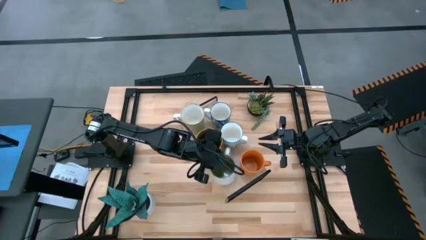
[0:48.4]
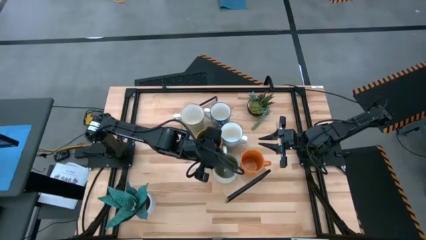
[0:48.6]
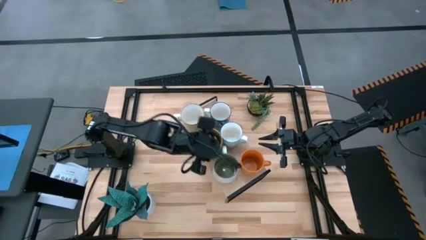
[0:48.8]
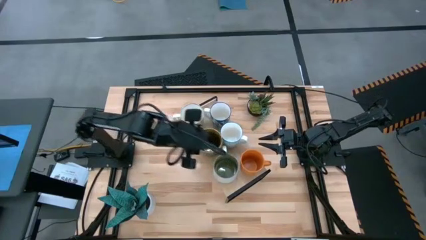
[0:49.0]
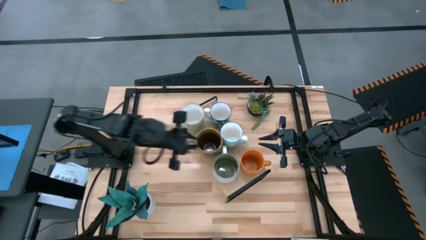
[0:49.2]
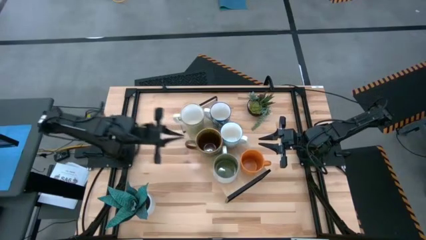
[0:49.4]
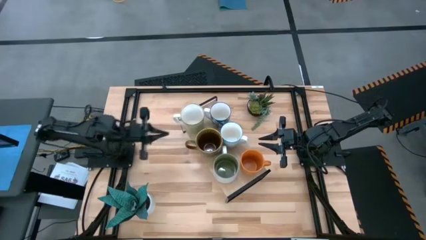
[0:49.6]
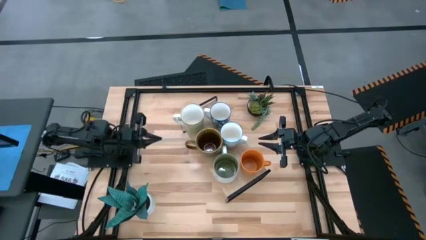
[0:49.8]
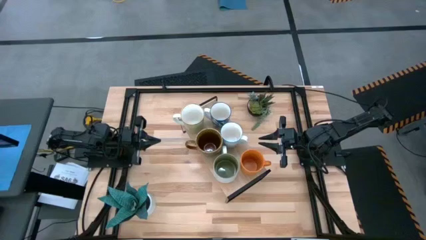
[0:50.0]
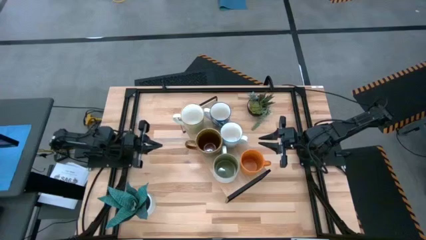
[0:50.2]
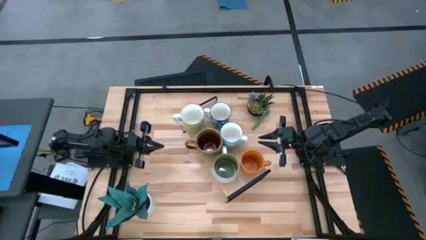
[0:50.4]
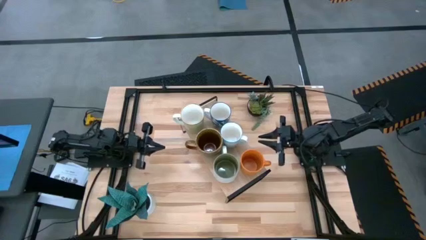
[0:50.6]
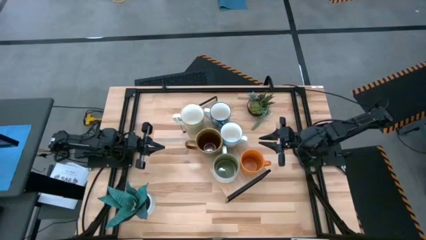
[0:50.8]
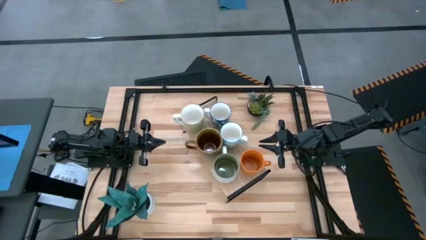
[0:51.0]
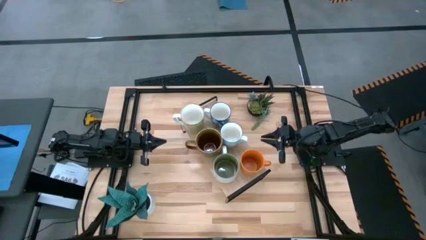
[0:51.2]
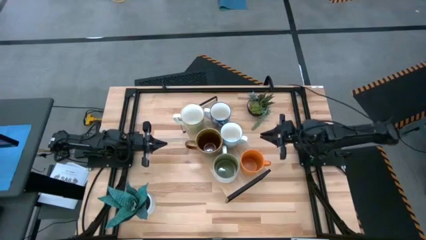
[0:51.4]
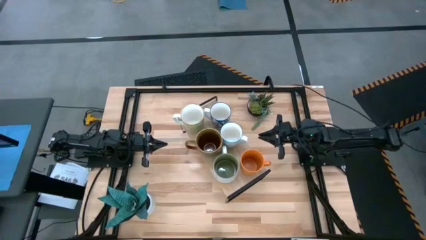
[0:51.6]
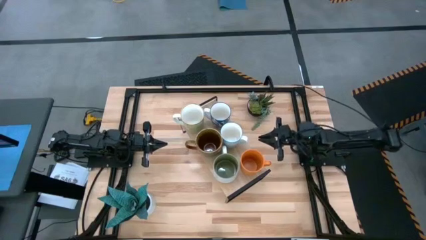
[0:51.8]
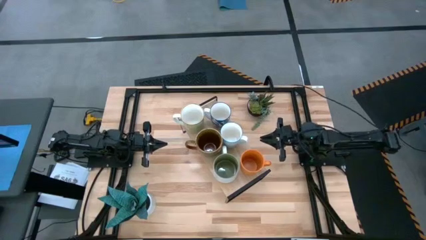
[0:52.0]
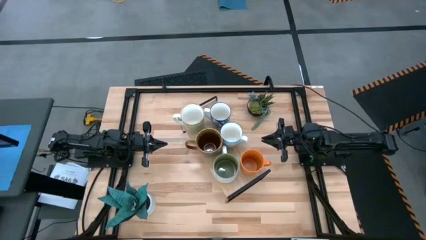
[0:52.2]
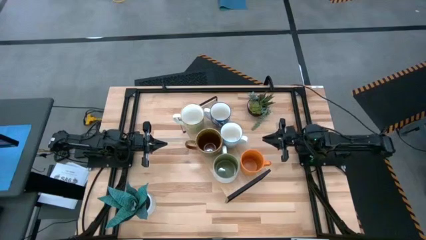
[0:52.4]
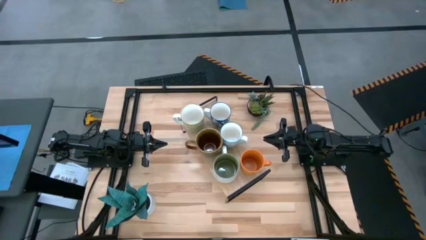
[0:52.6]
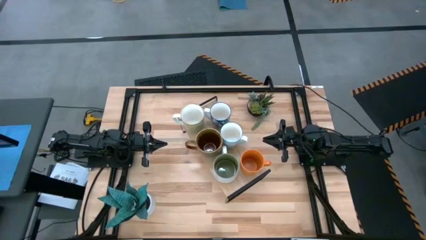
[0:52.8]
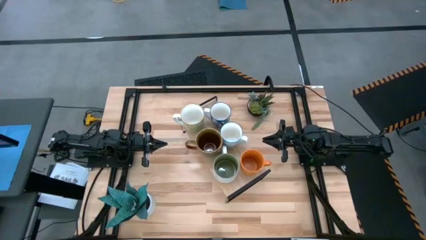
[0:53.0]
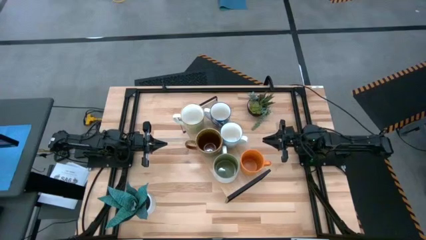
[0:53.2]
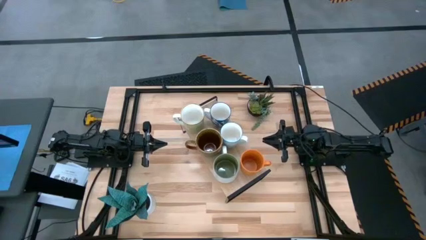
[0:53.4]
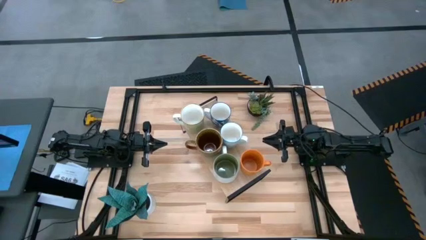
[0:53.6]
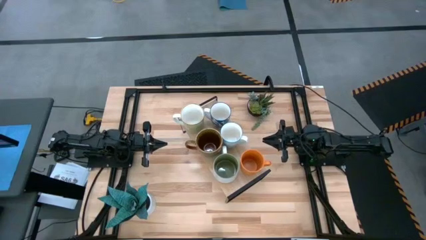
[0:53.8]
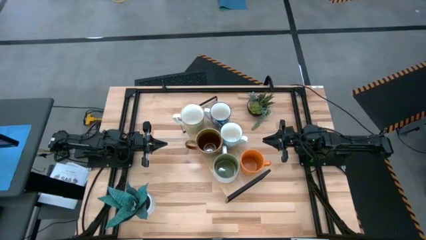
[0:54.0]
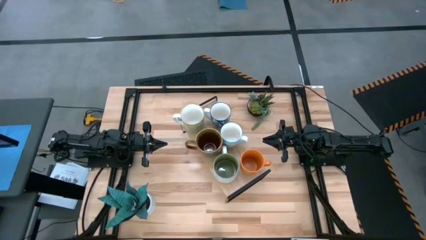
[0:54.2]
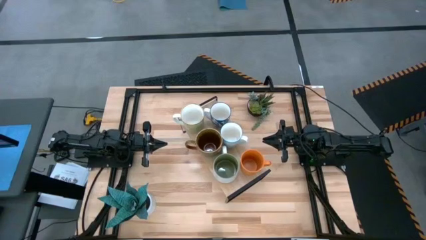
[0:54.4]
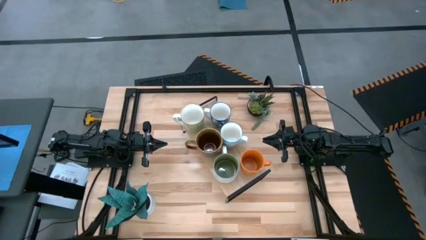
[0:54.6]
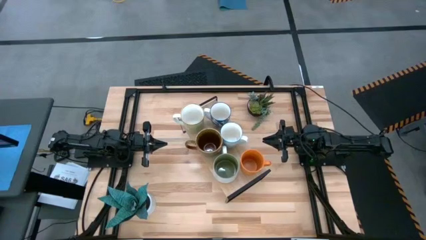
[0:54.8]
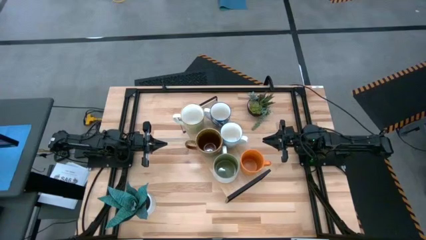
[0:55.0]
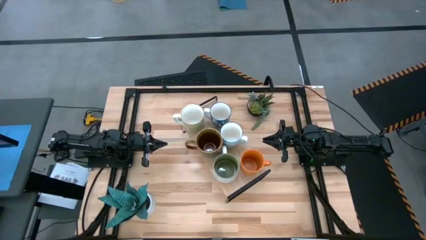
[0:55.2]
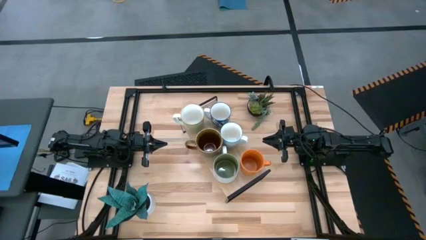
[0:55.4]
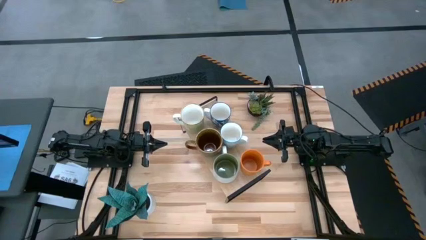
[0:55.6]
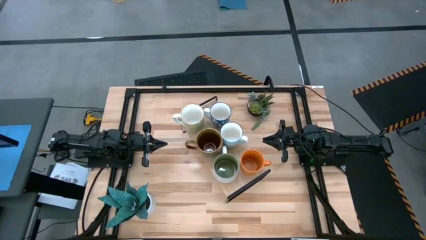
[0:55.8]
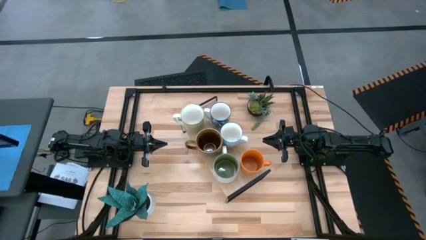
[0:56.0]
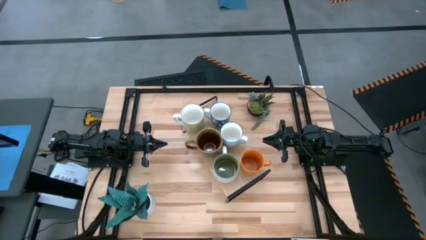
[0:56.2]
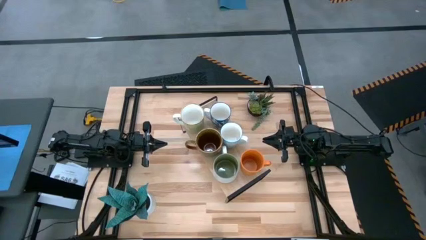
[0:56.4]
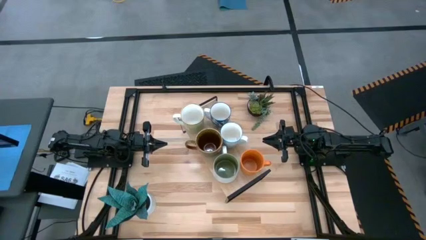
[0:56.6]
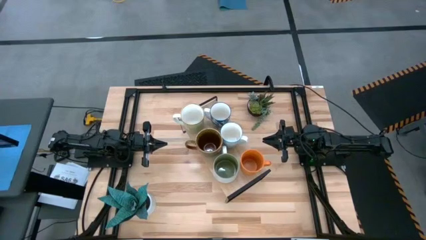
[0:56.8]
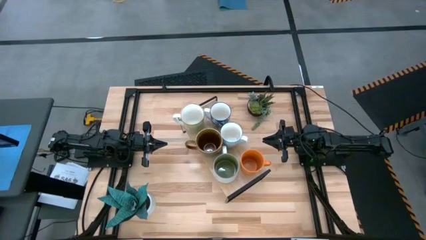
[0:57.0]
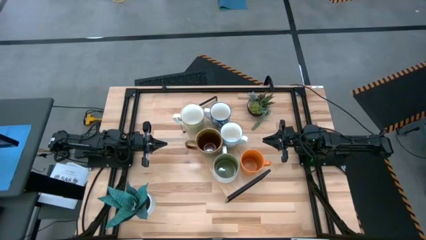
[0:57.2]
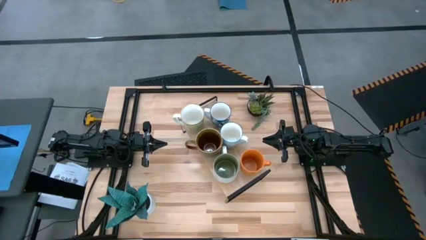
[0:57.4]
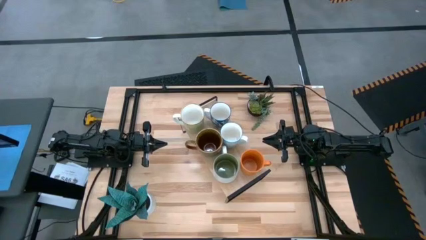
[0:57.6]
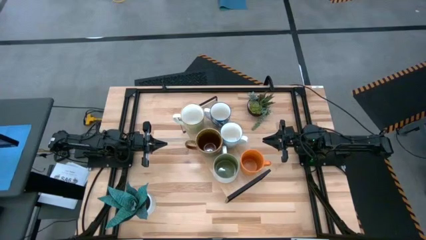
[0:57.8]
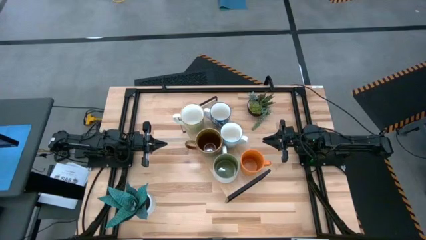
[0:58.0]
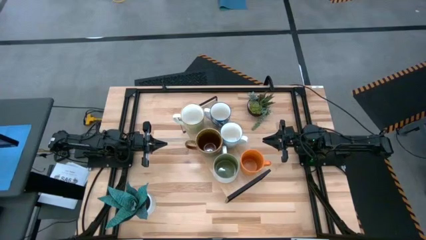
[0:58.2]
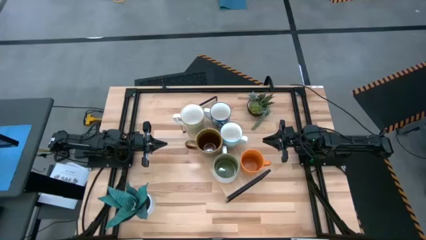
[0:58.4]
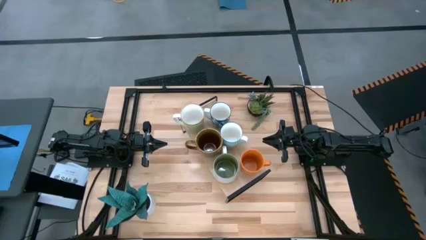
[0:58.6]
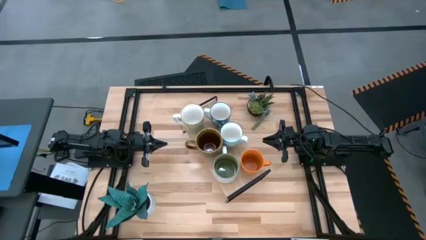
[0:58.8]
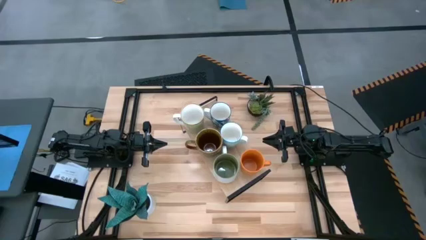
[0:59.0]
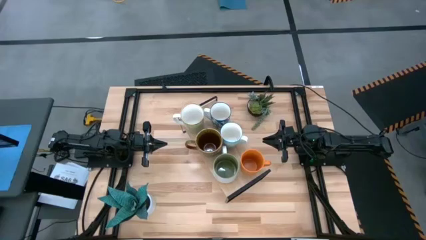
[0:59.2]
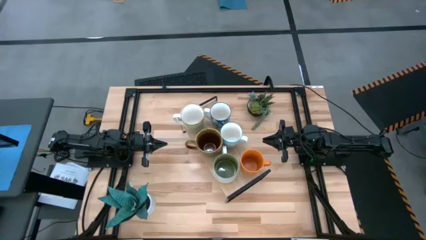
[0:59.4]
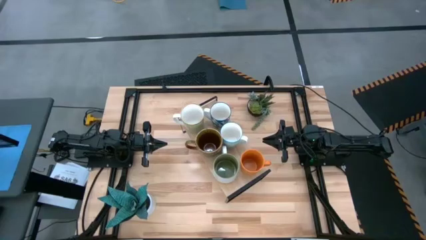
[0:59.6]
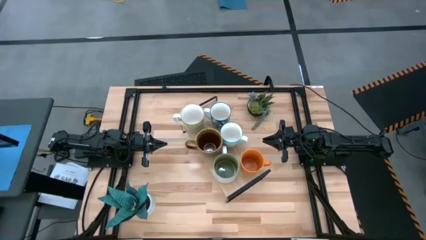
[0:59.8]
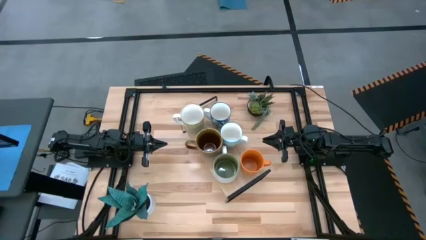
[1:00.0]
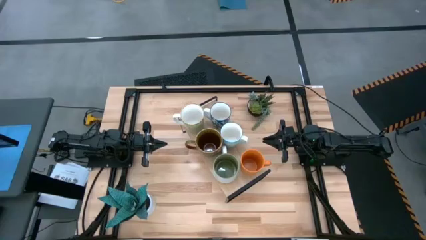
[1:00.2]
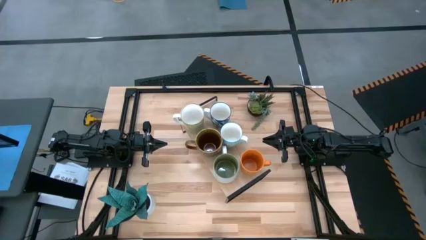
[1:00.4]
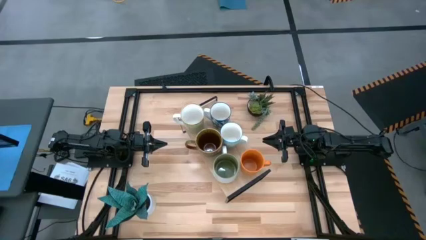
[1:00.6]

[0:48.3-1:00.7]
Task: Place coffee mugs
Return to Home Position
